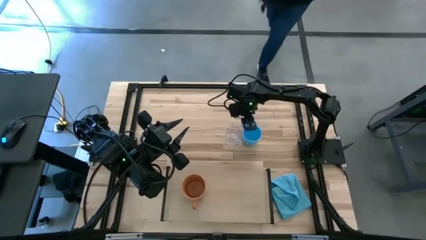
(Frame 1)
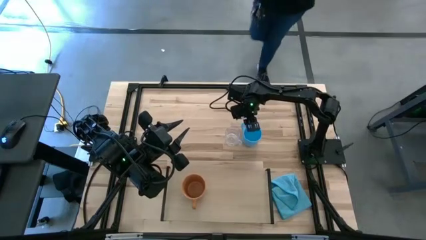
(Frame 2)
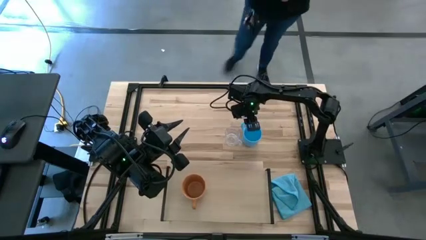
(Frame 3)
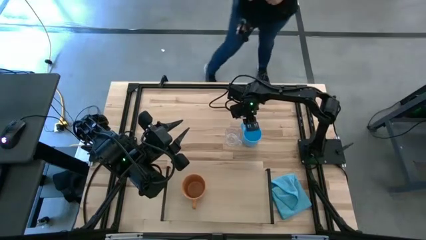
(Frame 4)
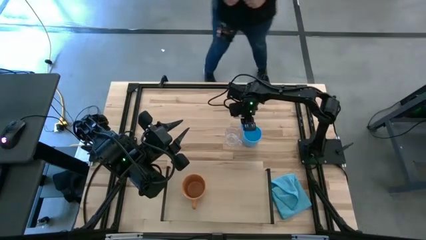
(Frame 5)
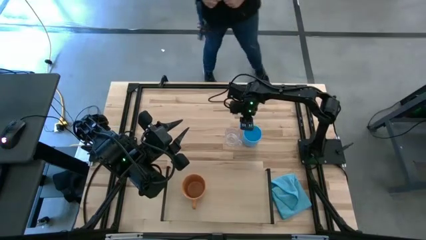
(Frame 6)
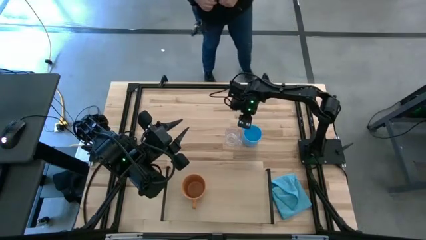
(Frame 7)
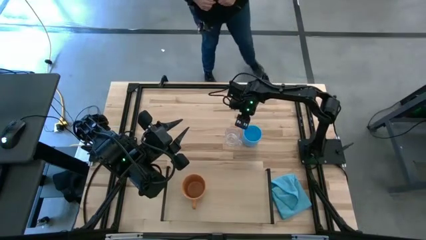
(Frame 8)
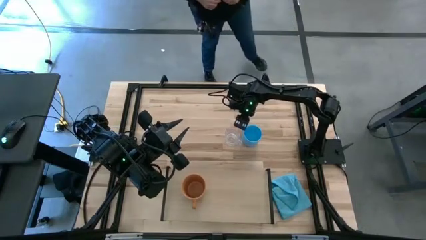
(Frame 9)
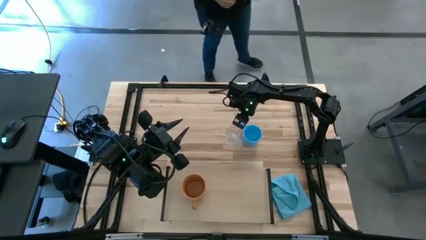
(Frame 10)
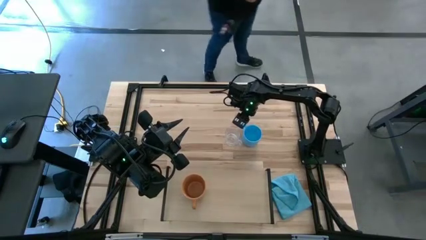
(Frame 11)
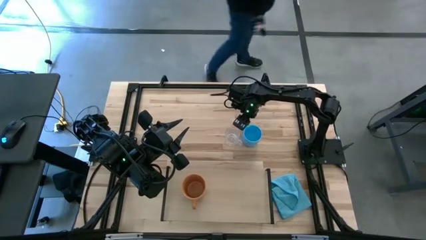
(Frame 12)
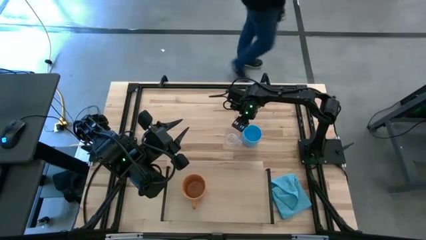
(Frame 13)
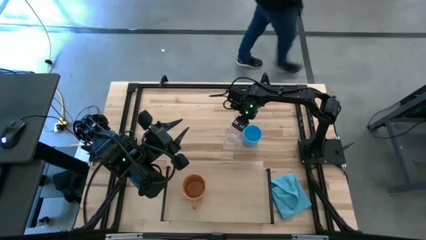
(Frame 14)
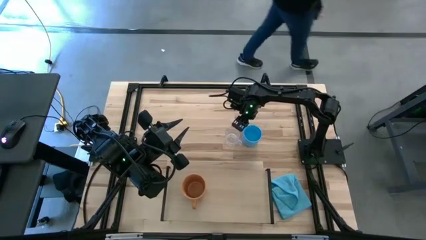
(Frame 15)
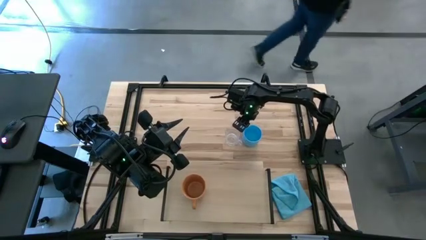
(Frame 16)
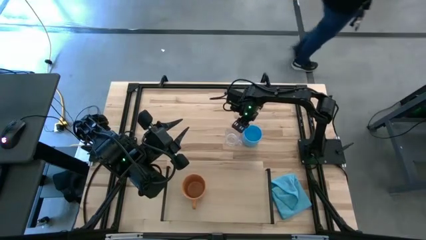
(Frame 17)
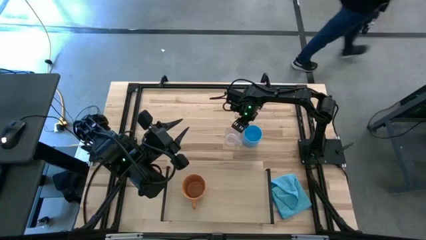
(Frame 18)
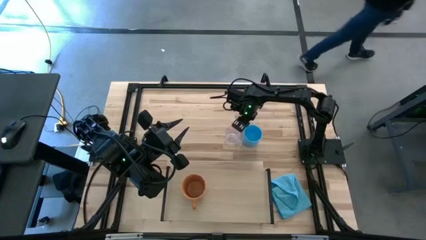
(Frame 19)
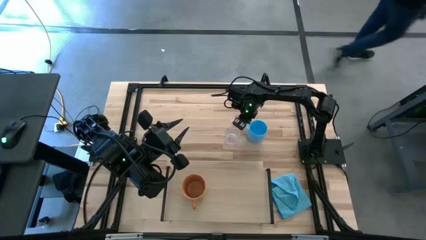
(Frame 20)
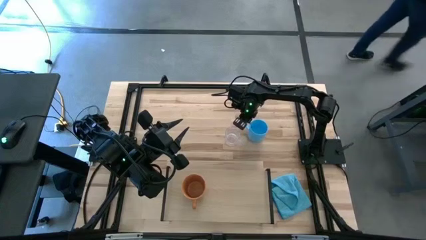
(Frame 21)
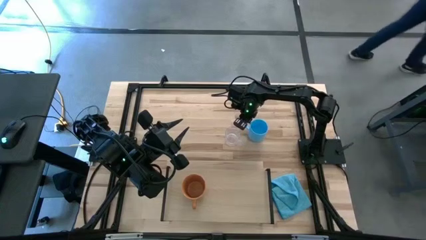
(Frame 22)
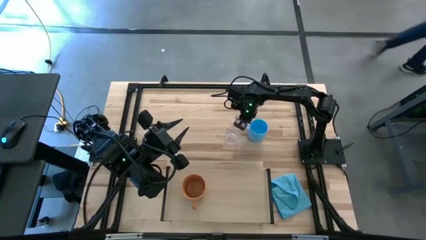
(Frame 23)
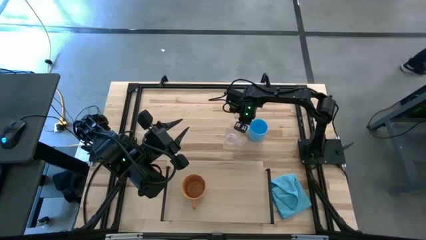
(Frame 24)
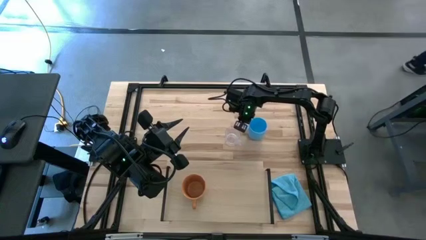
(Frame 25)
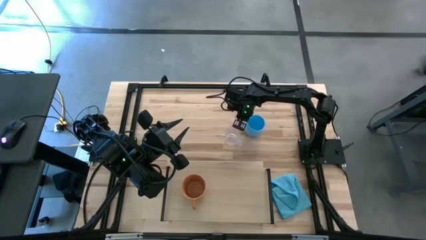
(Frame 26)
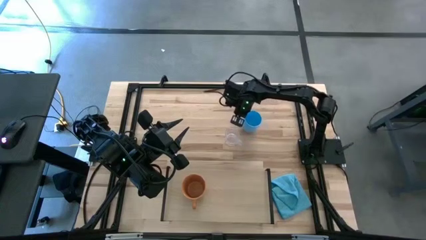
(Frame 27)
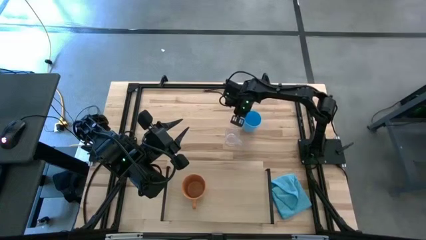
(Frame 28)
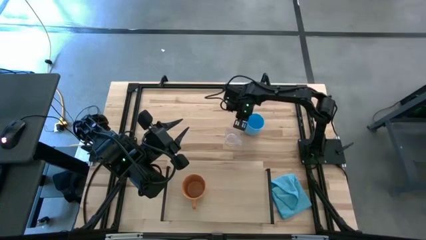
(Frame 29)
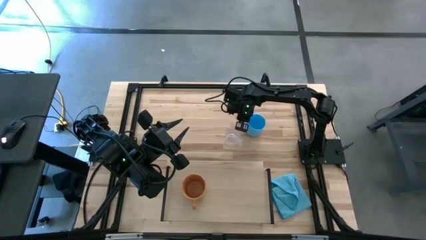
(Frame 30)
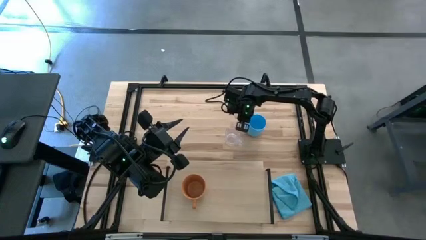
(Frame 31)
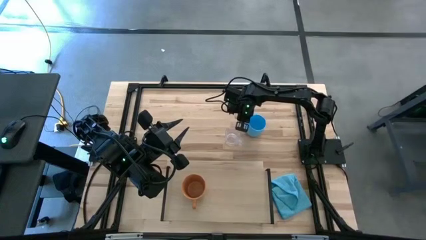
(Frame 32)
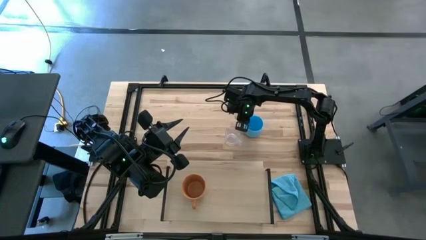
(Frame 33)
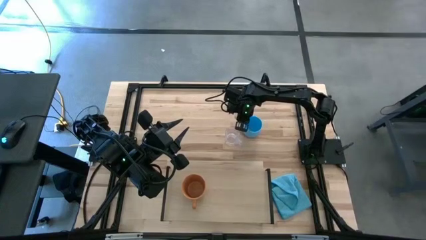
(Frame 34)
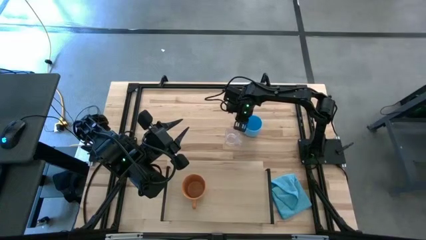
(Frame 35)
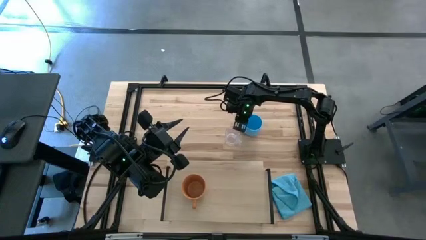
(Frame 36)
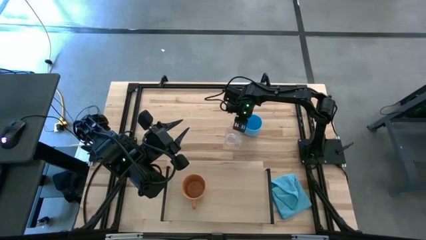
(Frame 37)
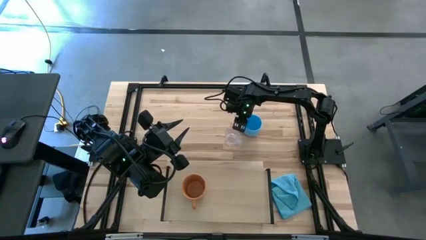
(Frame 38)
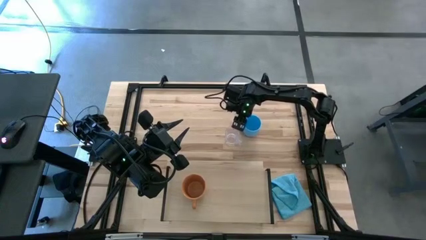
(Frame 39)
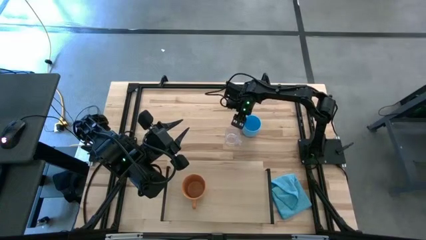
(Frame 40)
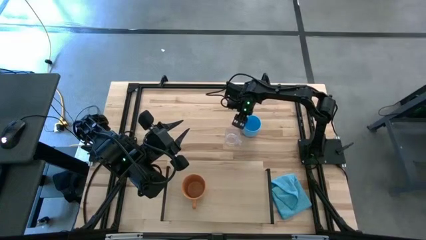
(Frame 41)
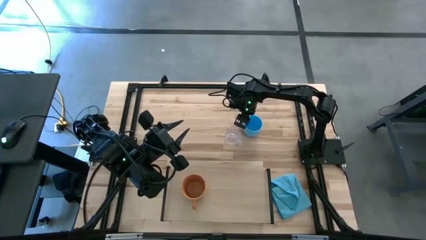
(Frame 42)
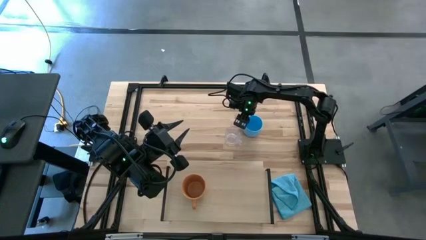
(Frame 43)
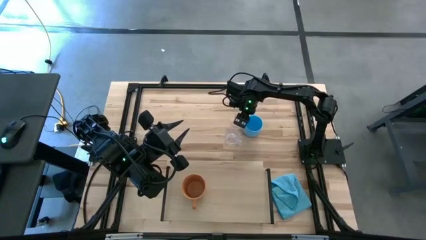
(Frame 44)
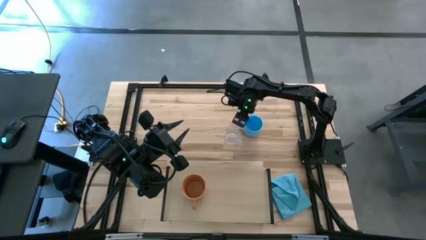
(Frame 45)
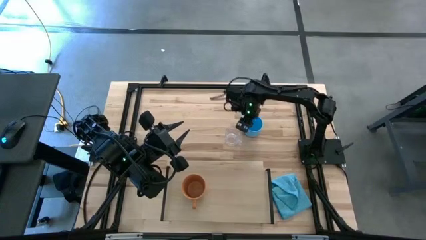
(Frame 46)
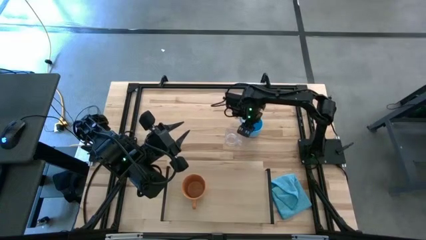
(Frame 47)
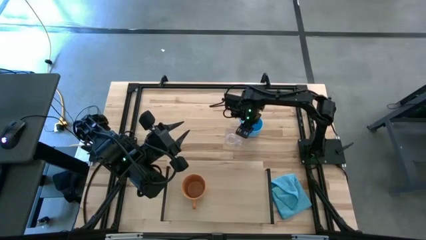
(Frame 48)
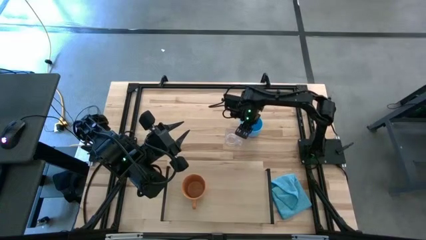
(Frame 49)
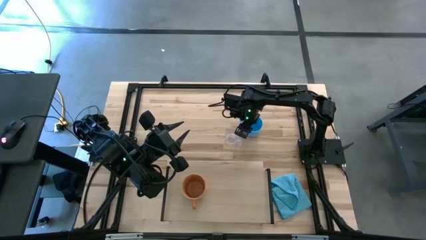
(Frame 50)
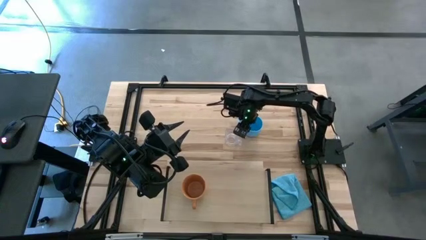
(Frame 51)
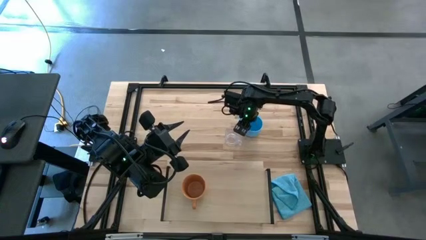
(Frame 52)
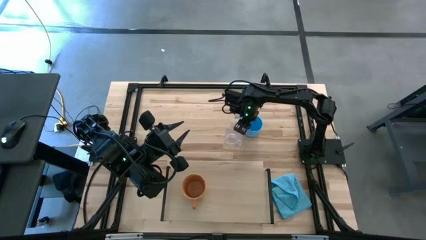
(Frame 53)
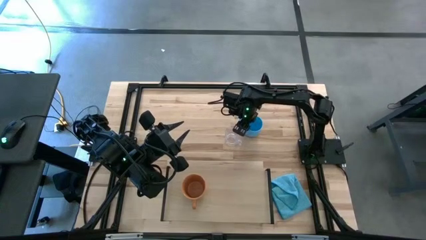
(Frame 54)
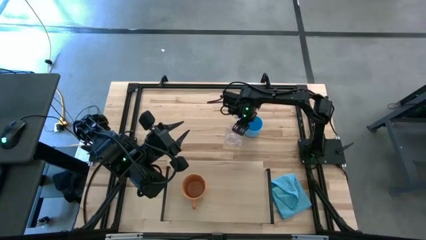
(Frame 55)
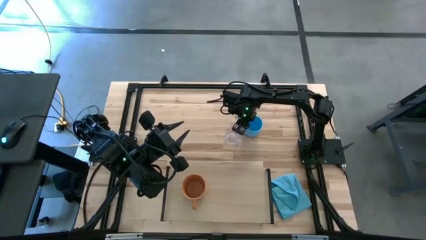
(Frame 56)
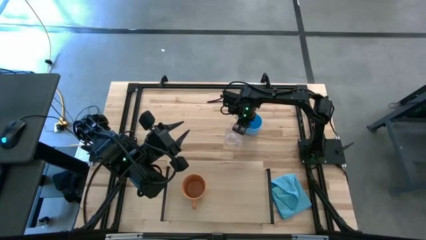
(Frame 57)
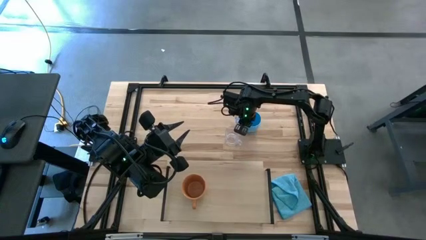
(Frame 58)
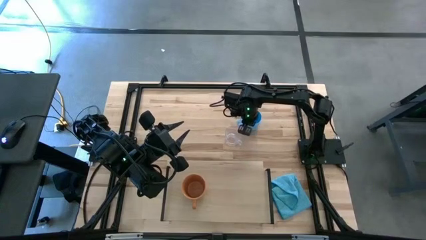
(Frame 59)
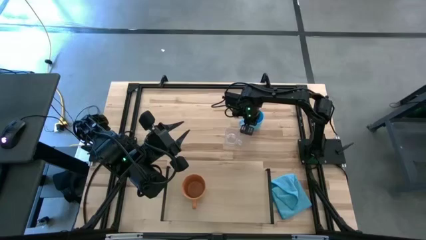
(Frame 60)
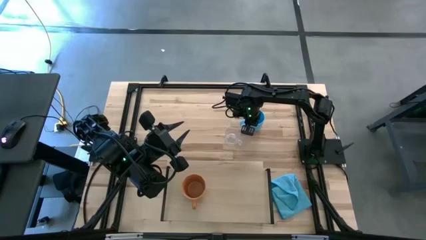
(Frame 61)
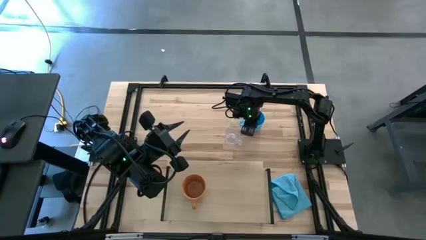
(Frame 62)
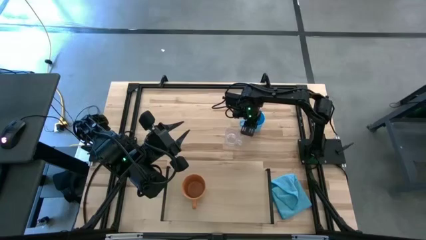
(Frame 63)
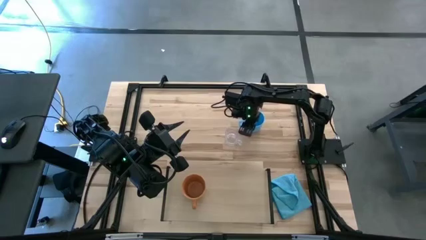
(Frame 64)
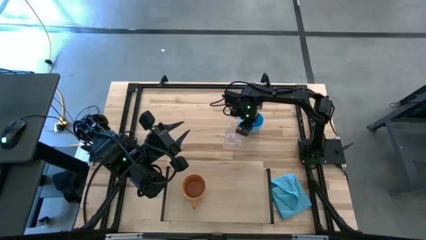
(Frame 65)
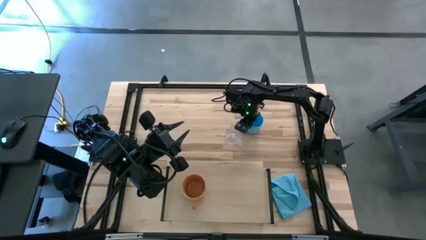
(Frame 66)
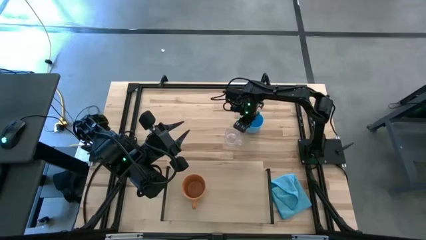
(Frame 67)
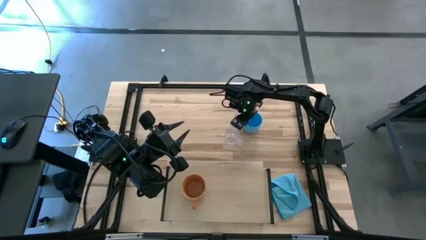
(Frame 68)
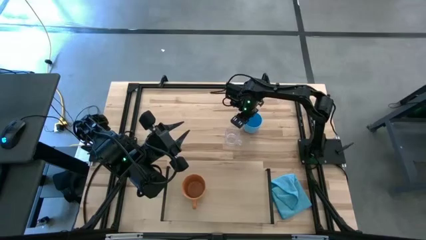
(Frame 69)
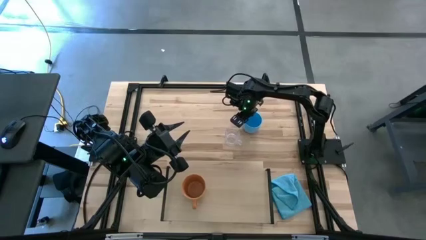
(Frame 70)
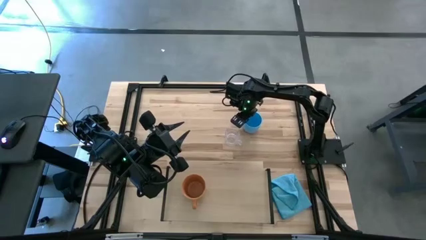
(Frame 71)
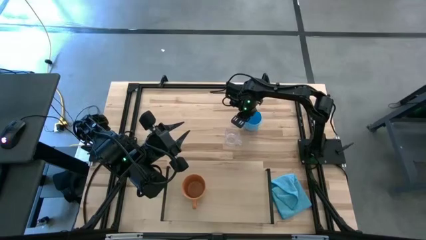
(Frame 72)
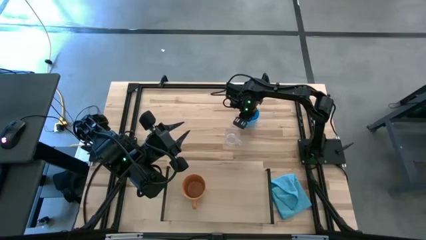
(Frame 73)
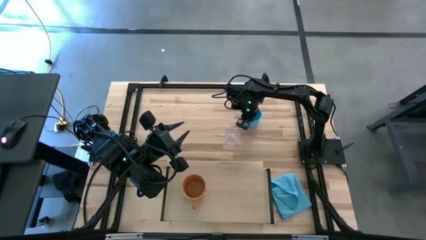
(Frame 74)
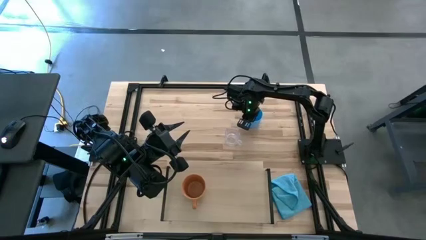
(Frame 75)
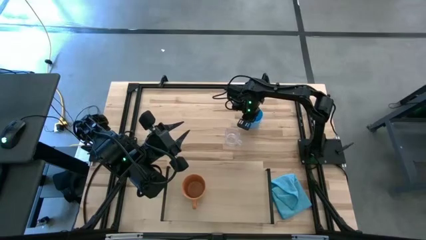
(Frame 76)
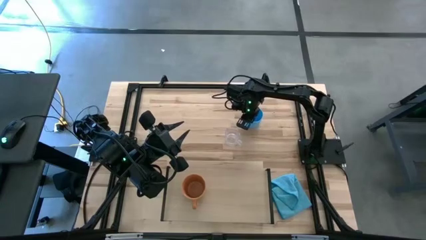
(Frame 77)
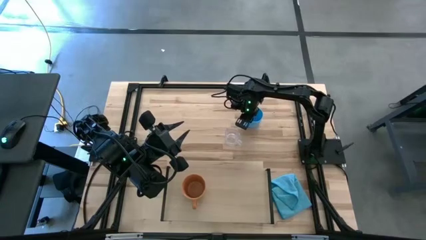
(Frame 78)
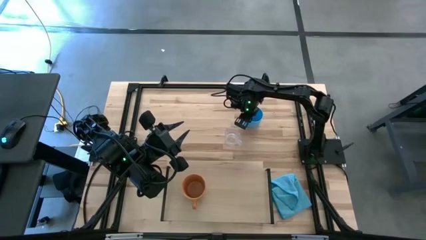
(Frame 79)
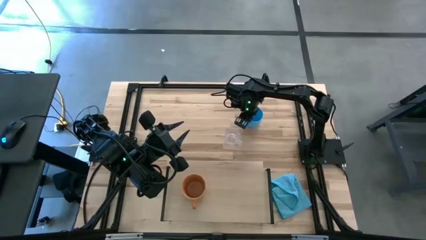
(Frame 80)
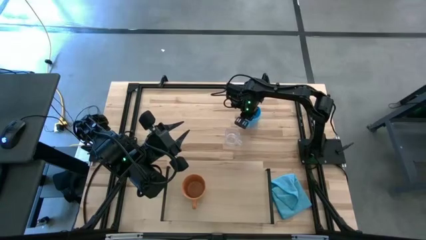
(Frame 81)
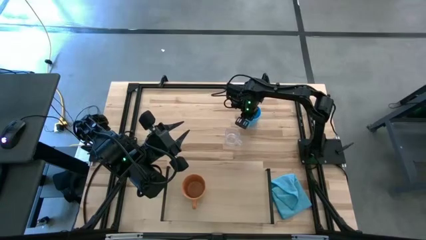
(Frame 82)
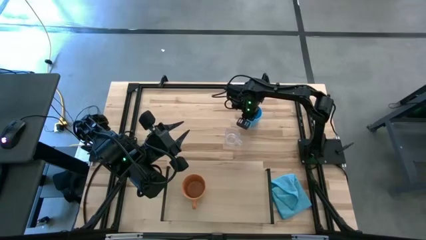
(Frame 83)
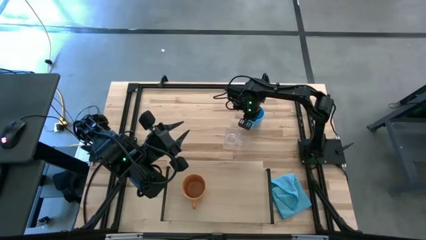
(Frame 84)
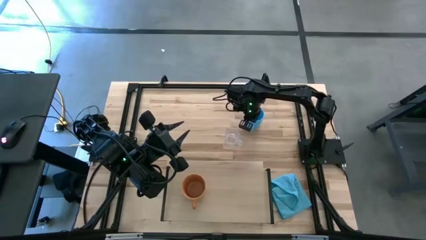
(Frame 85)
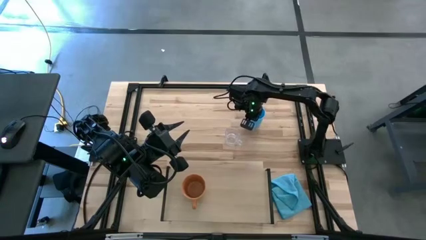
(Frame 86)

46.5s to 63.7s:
Task: Stack small to large cups/mugs on shelf
Put the blue mug on the shelf
